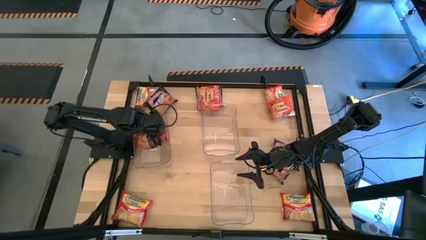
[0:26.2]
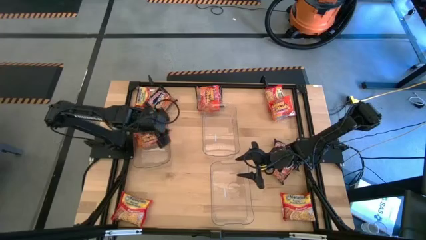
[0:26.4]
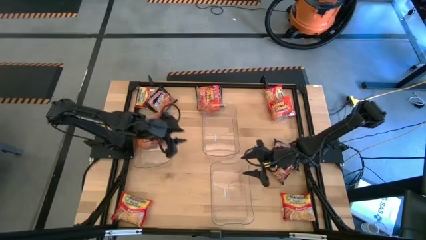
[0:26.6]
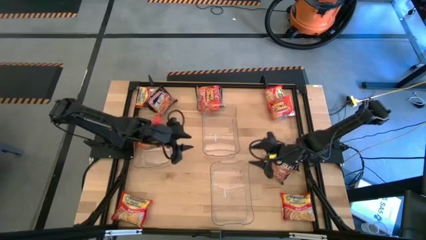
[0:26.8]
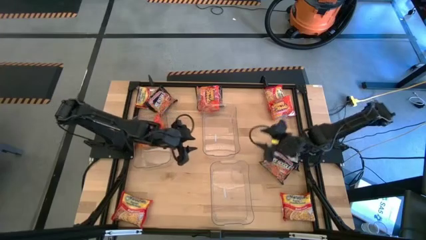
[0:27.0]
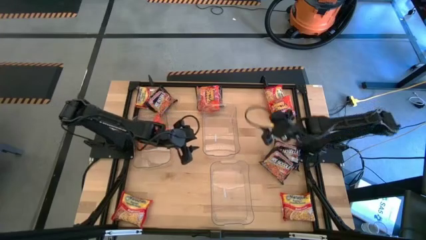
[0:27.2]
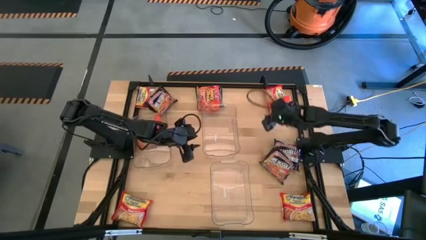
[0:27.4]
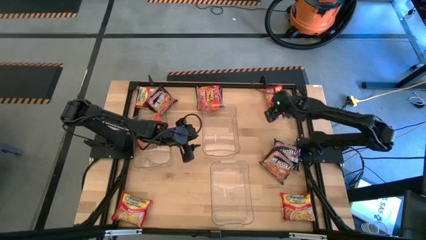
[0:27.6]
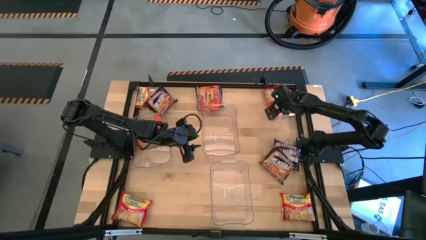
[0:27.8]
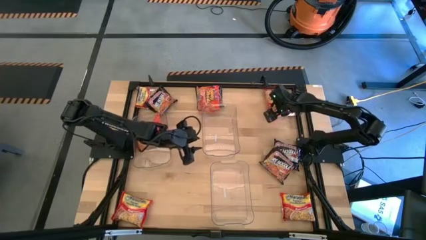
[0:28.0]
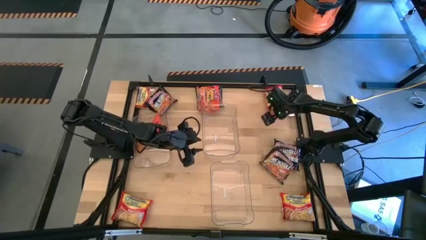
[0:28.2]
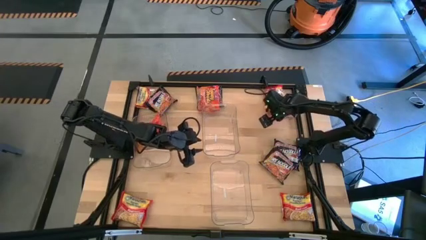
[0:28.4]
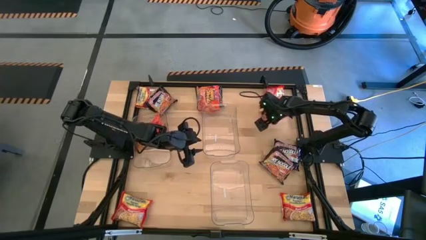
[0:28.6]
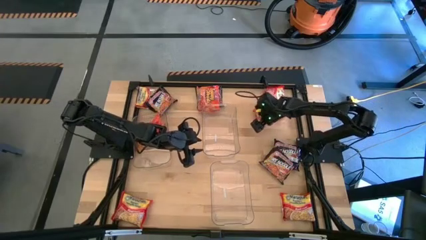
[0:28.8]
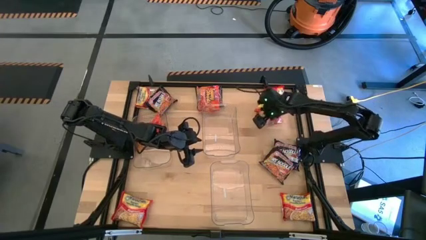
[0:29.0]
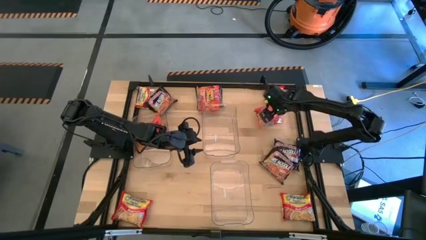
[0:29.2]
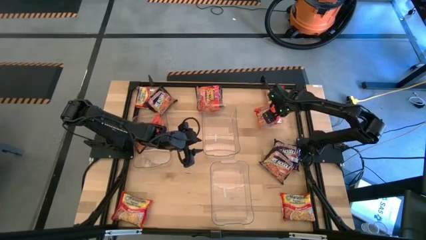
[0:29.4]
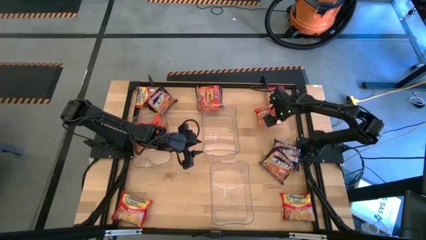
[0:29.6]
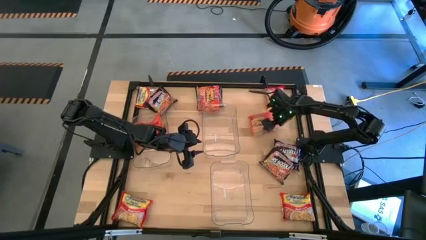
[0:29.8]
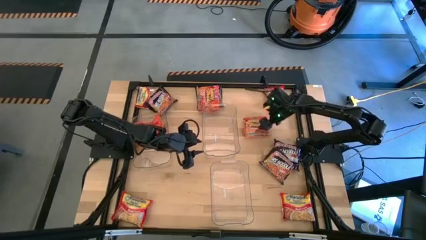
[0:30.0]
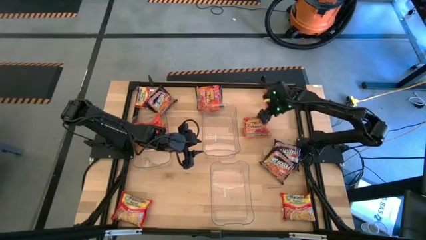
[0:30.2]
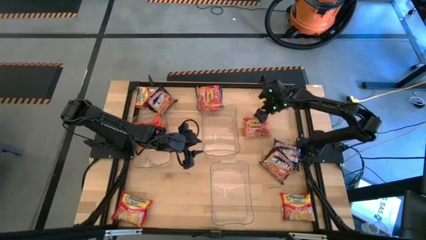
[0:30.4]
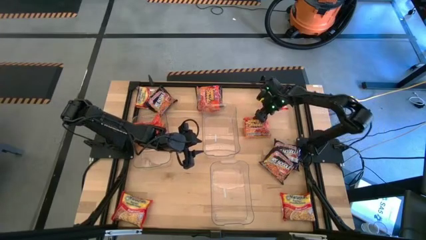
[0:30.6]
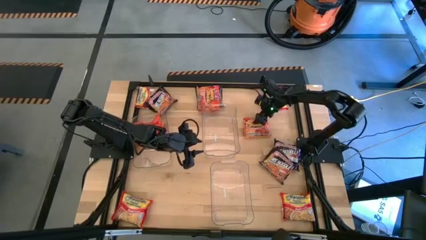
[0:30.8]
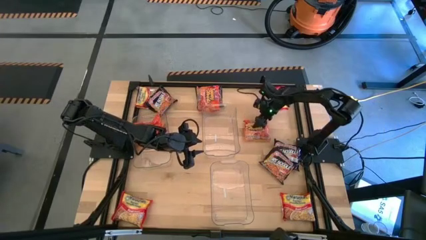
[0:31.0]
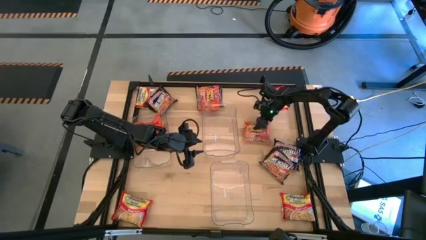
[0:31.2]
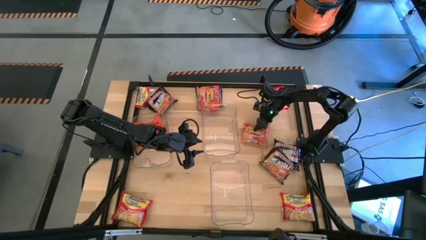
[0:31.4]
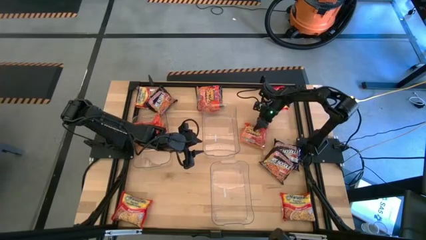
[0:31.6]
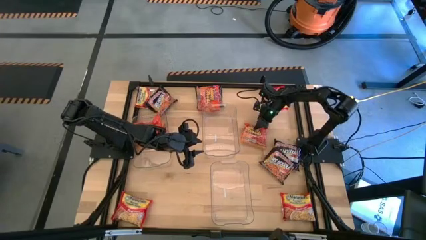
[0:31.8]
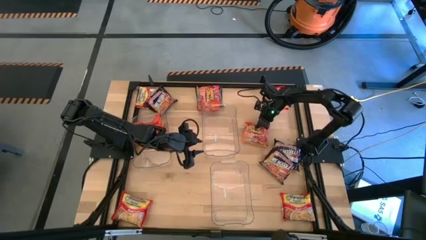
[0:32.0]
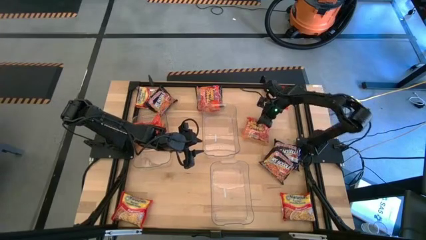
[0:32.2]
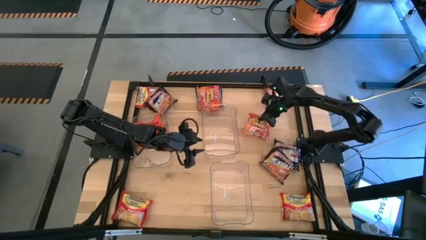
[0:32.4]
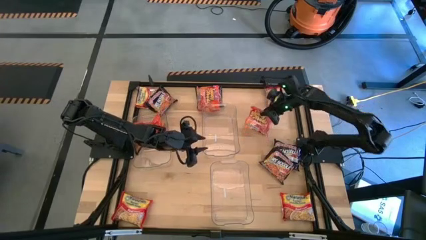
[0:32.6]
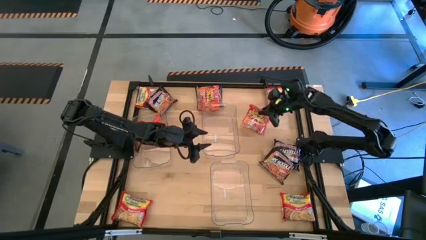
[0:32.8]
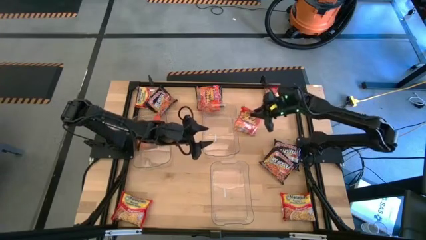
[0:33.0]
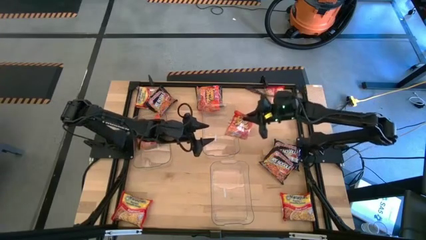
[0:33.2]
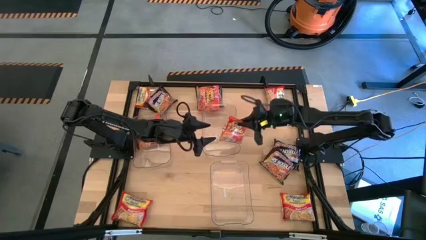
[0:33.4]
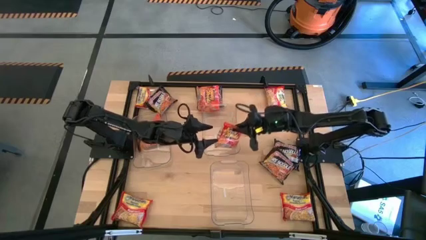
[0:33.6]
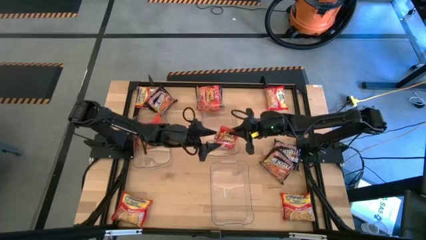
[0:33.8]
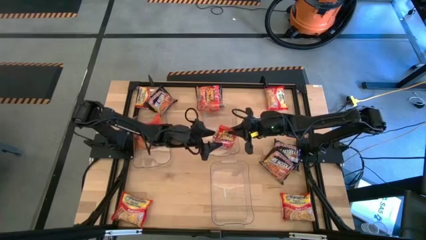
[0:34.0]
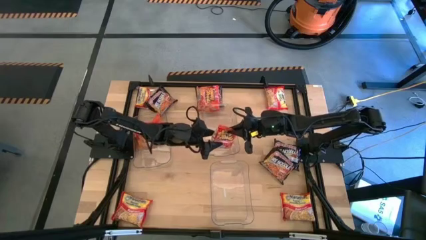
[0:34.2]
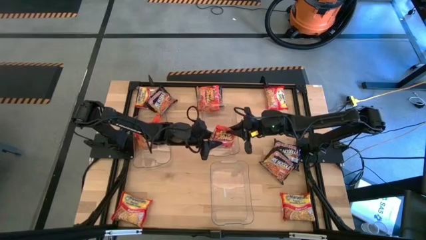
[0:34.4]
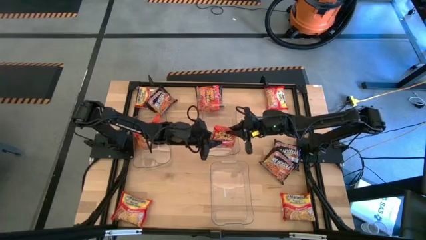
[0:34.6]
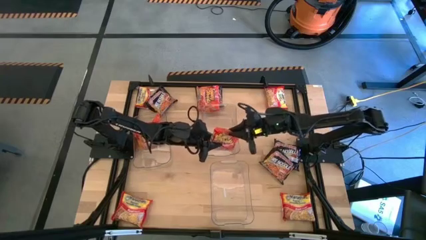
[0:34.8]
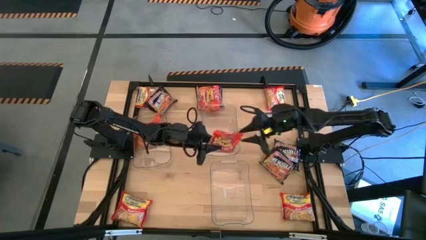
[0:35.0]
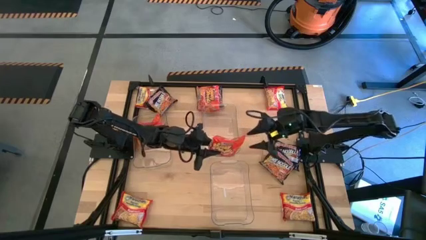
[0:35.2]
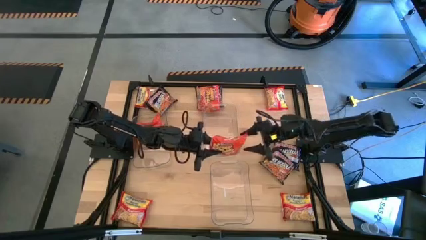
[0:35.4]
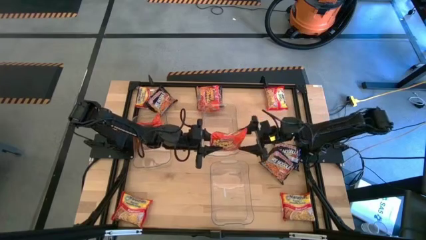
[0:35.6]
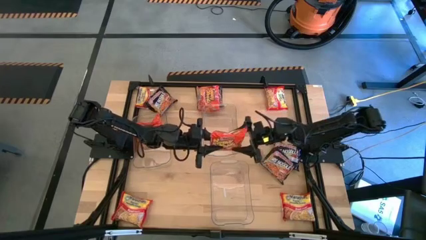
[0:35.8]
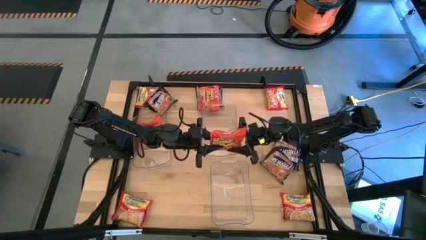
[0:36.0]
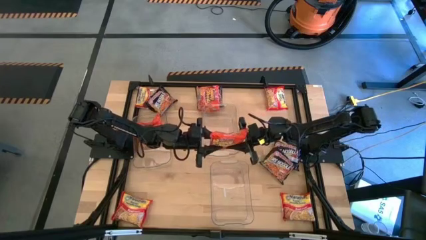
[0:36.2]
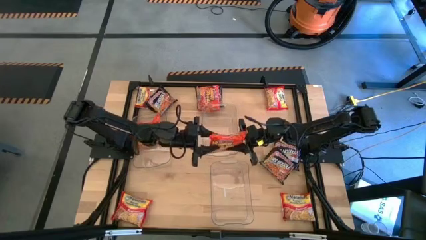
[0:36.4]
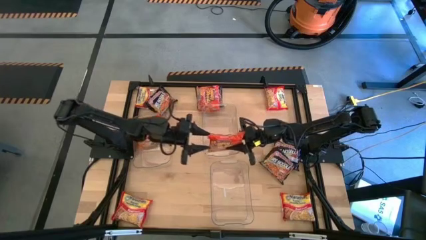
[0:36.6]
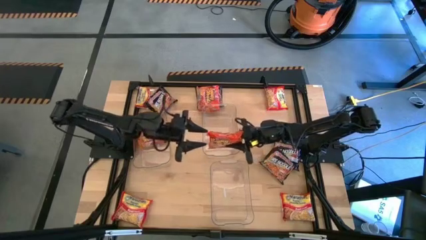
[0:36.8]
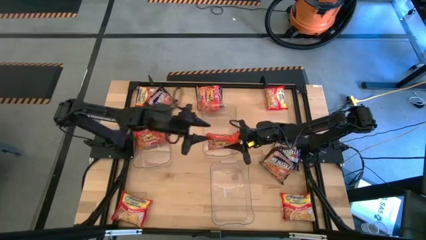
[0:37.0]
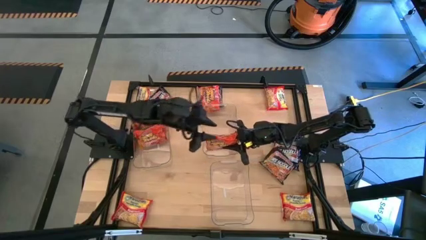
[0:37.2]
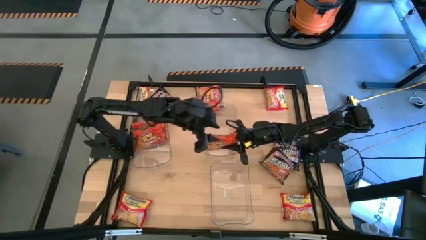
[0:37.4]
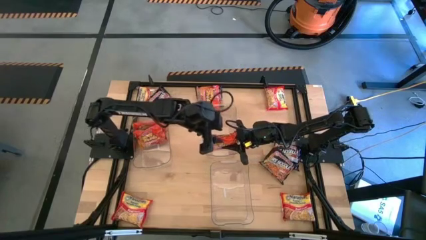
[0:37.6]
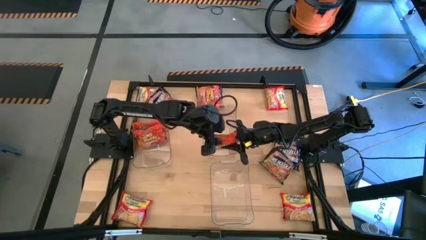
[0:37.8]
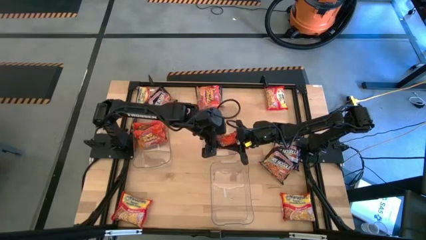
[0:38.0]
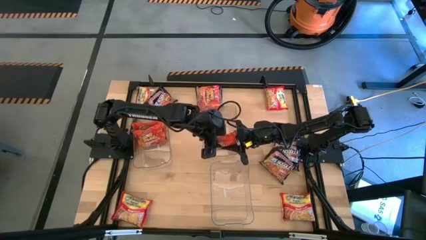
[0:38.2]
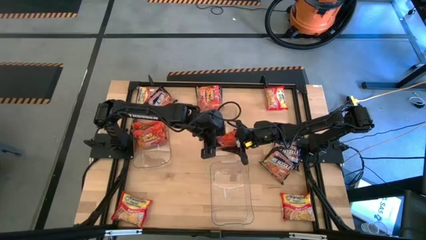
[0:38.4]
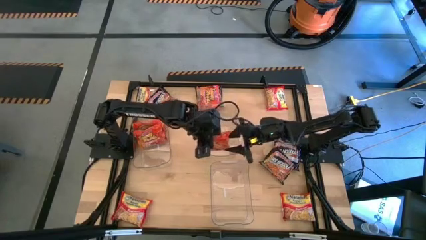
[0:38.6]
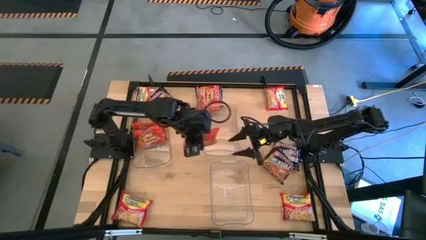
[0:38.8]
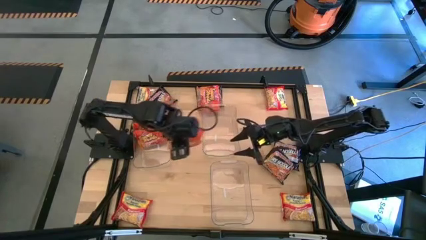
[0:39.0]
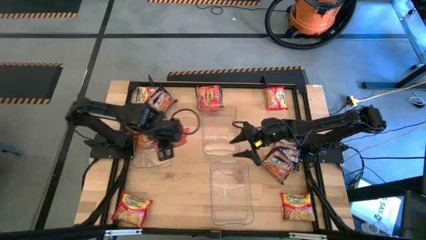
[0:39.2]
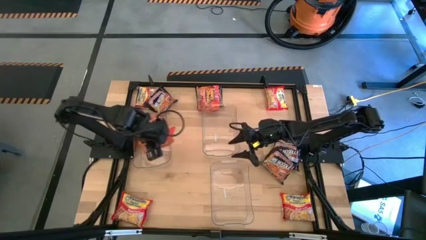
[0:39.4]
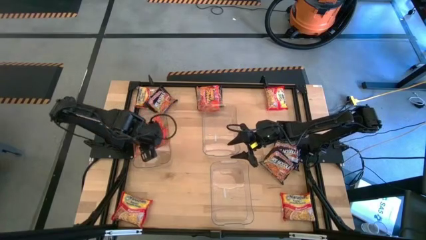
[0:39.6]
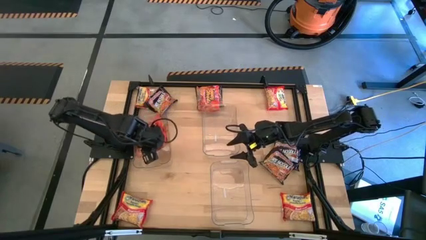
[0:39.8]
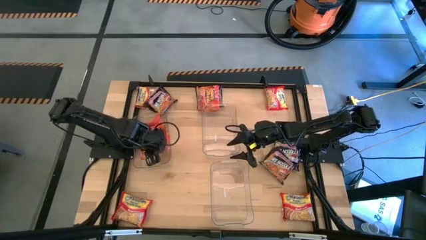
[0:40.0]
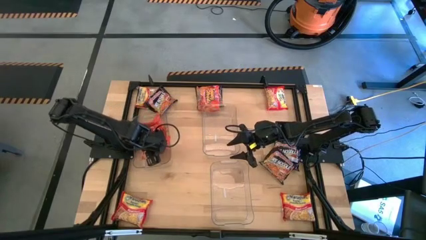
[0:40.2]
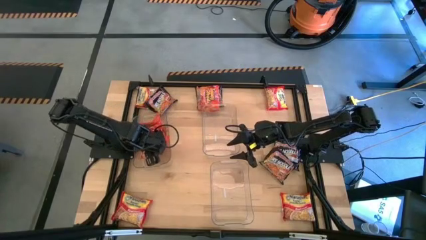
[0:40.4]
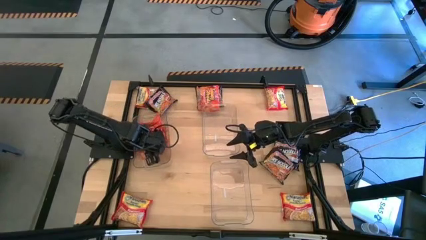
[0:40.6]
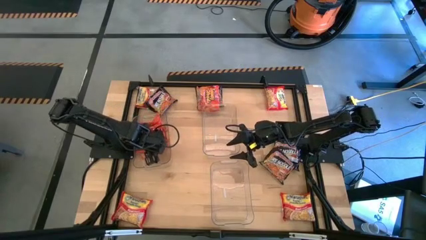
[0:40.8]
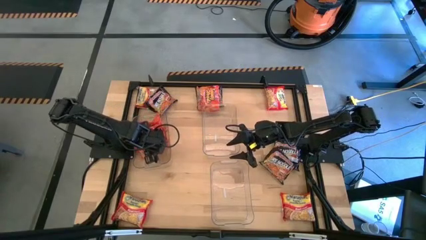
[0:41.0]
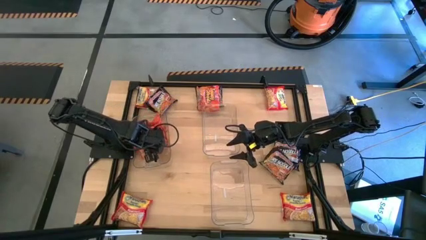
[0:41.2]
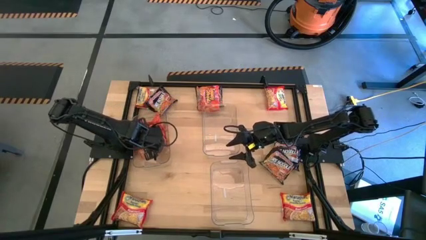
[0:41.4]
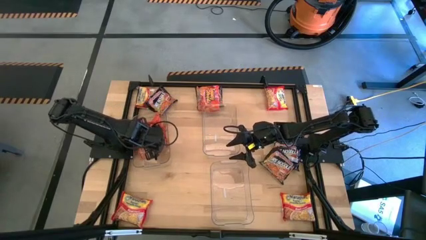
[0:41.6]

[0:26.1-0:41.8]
Task: Sort Maruchan noodles
Put the orange noodle pack into the top left transparent bin
